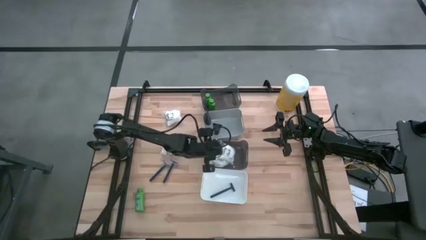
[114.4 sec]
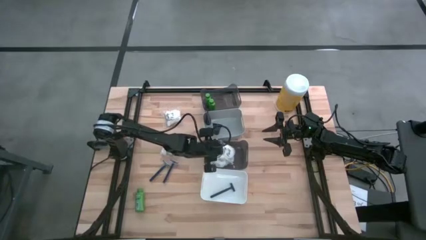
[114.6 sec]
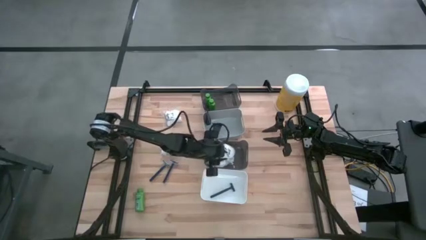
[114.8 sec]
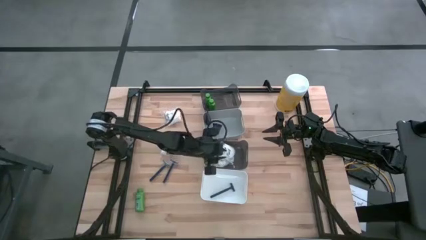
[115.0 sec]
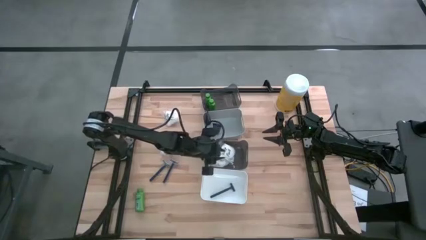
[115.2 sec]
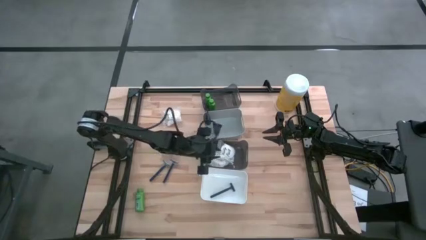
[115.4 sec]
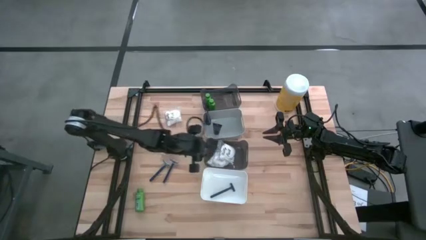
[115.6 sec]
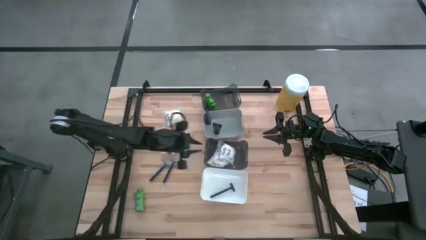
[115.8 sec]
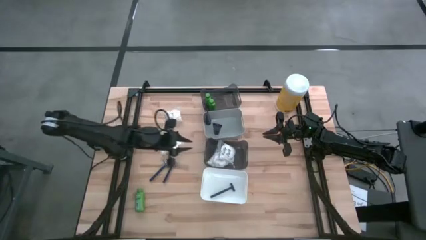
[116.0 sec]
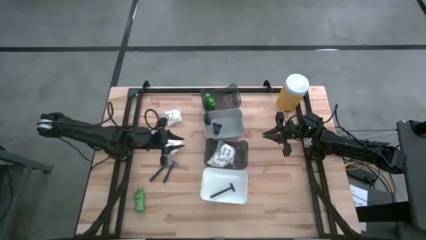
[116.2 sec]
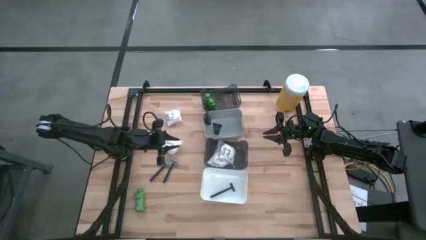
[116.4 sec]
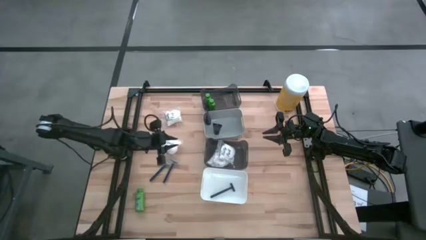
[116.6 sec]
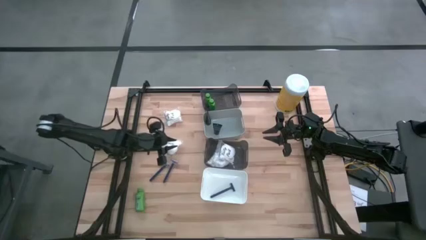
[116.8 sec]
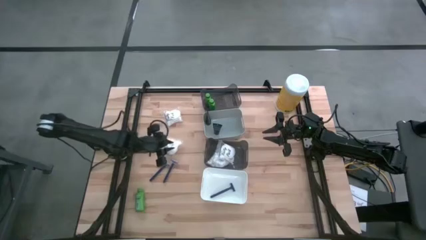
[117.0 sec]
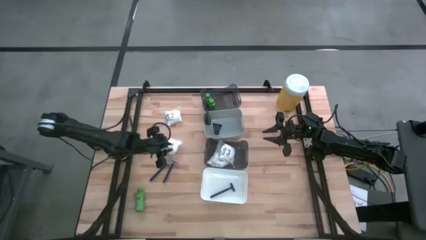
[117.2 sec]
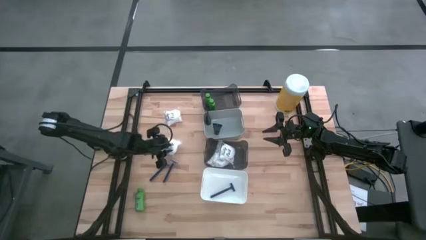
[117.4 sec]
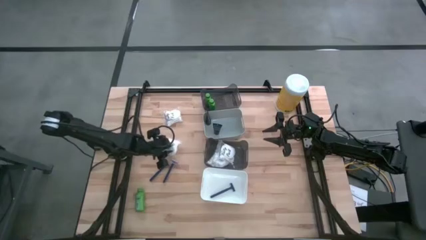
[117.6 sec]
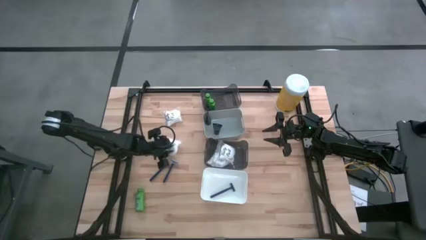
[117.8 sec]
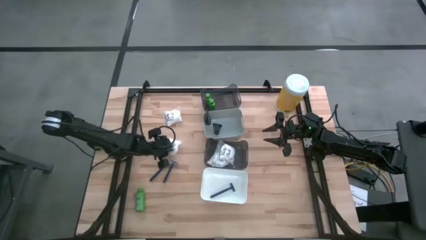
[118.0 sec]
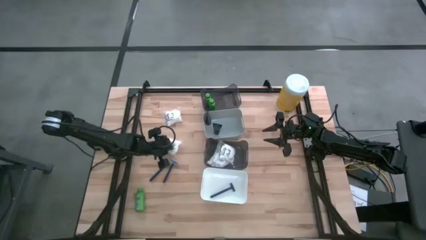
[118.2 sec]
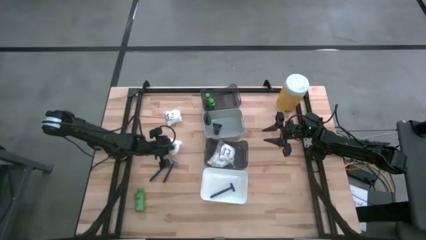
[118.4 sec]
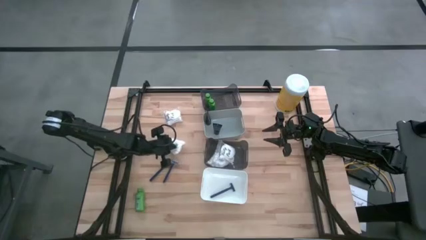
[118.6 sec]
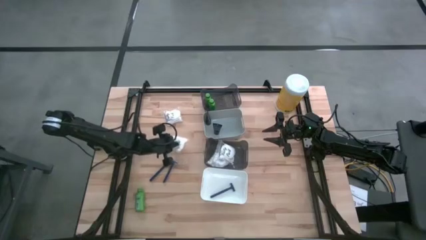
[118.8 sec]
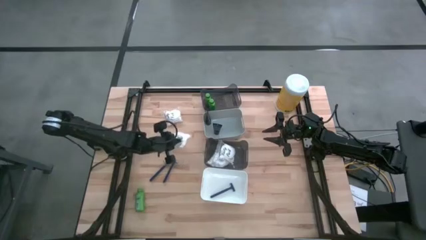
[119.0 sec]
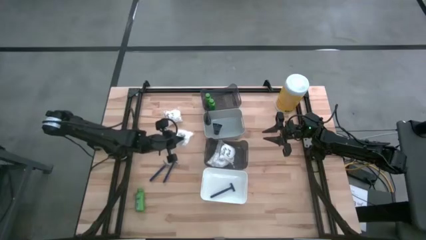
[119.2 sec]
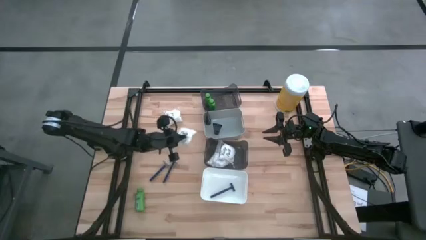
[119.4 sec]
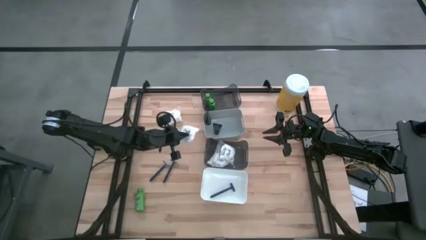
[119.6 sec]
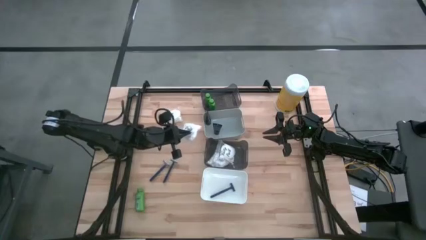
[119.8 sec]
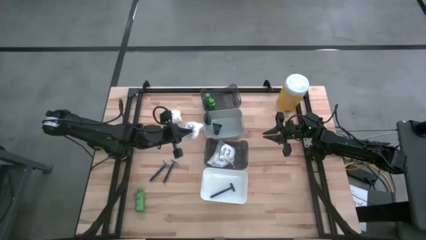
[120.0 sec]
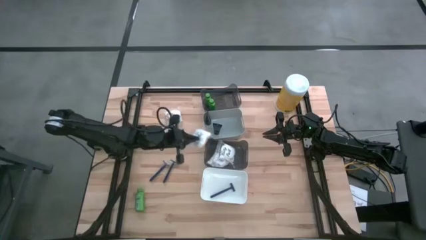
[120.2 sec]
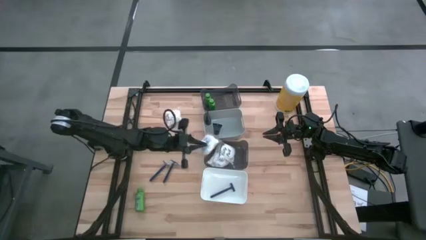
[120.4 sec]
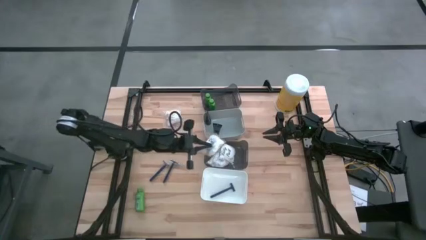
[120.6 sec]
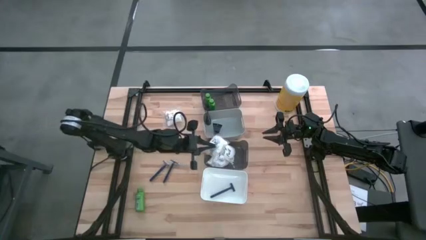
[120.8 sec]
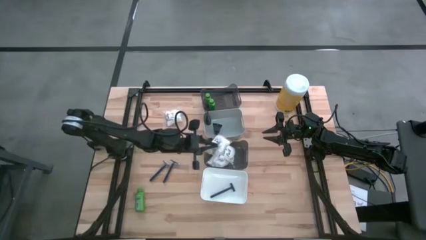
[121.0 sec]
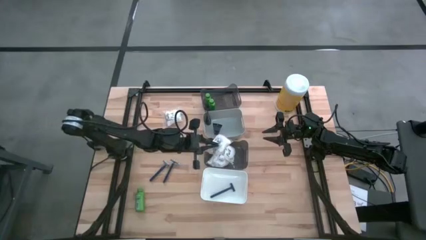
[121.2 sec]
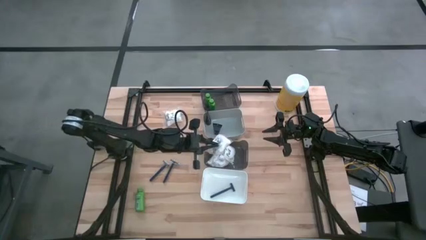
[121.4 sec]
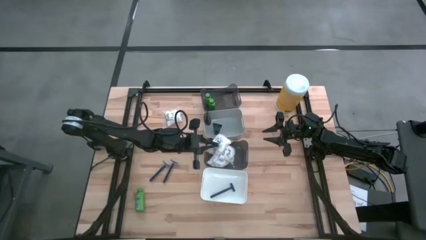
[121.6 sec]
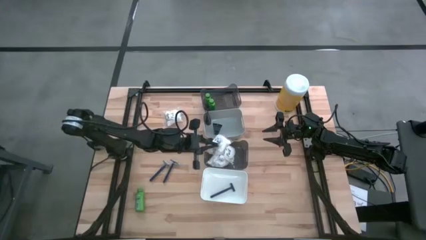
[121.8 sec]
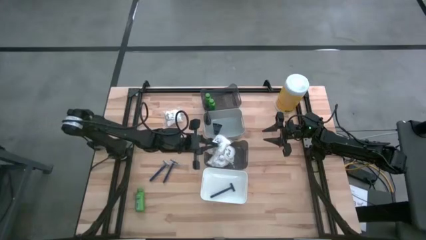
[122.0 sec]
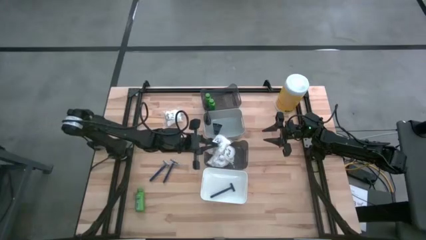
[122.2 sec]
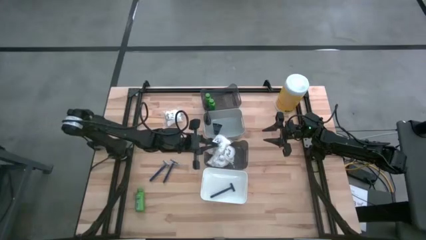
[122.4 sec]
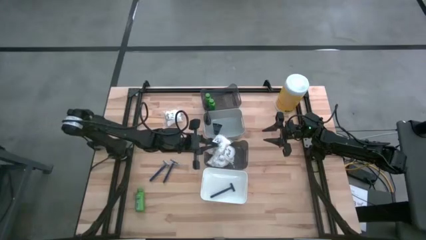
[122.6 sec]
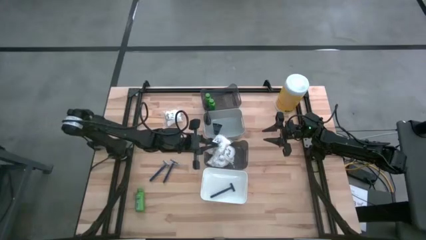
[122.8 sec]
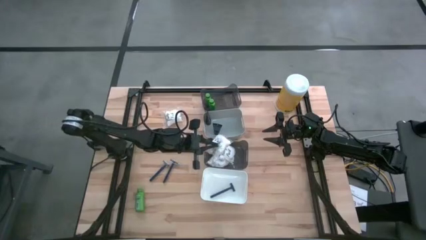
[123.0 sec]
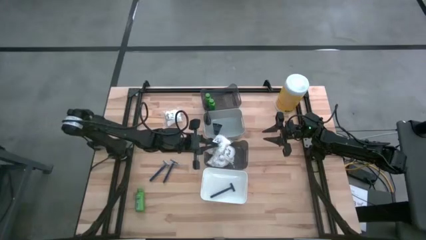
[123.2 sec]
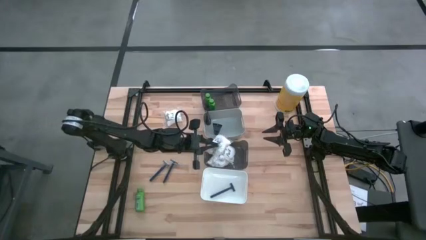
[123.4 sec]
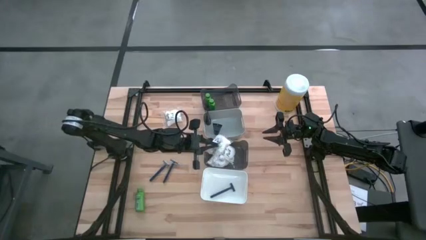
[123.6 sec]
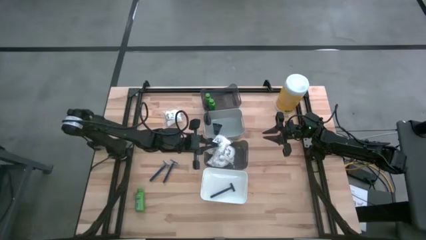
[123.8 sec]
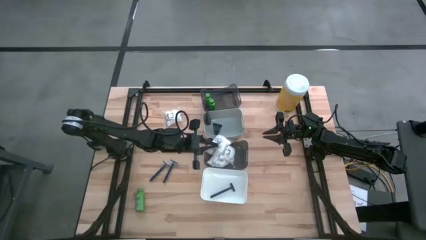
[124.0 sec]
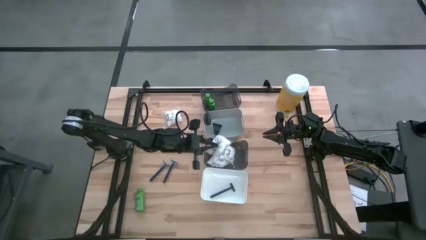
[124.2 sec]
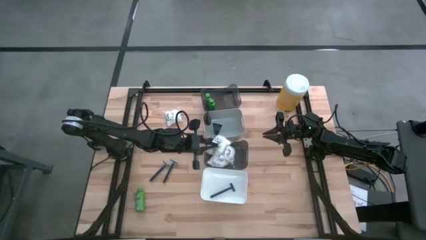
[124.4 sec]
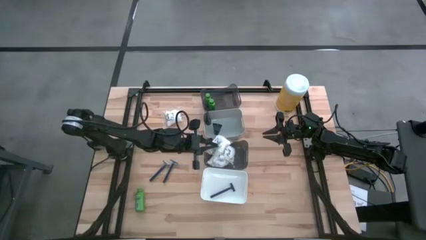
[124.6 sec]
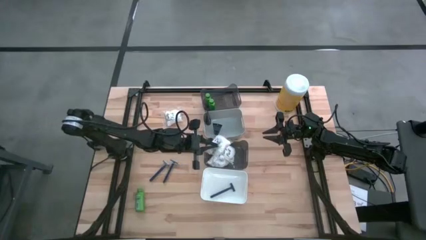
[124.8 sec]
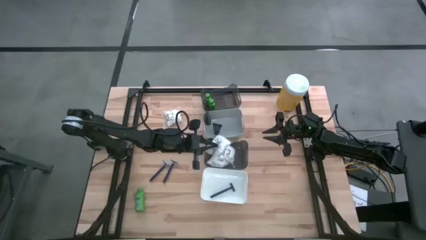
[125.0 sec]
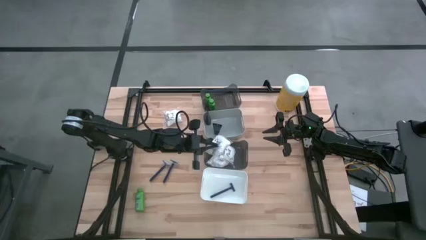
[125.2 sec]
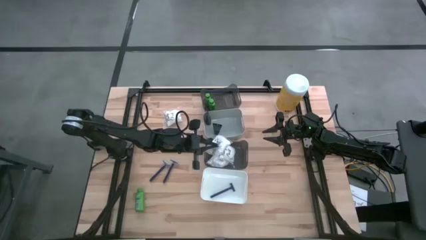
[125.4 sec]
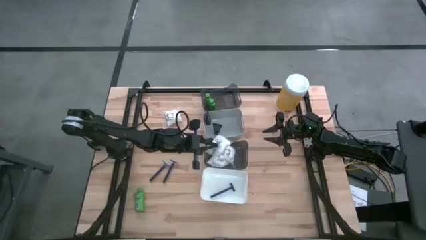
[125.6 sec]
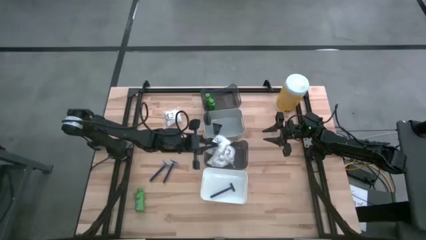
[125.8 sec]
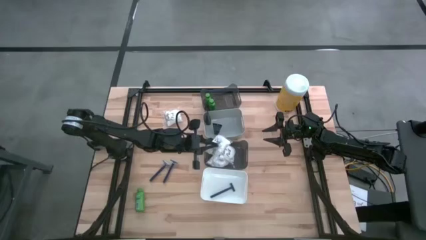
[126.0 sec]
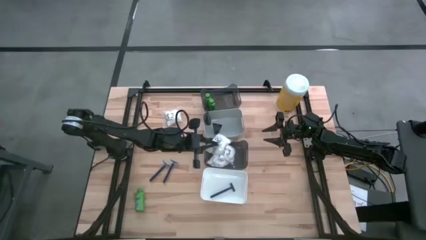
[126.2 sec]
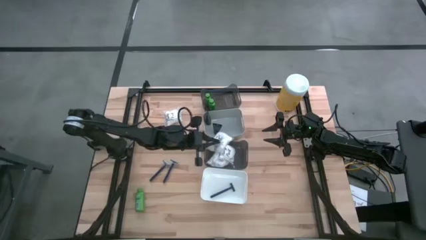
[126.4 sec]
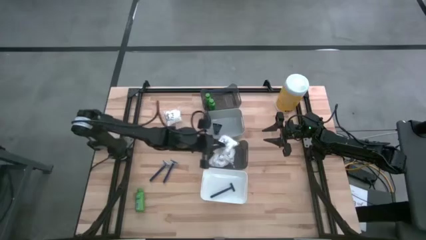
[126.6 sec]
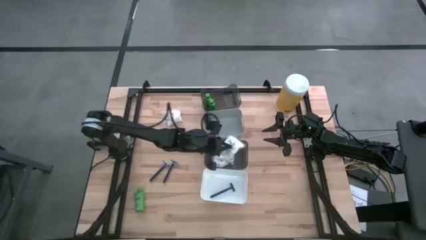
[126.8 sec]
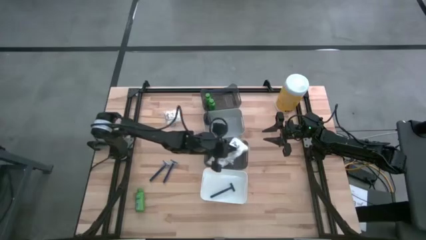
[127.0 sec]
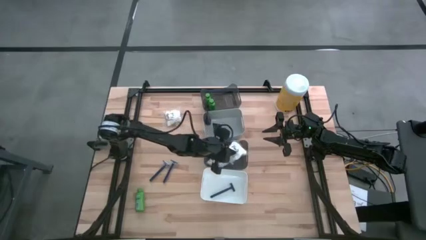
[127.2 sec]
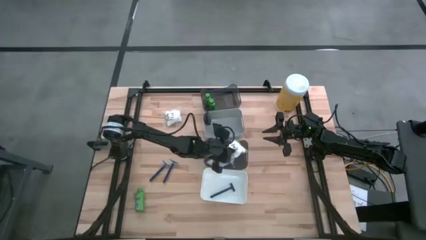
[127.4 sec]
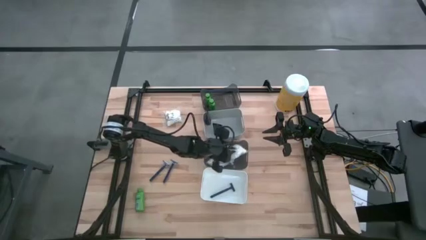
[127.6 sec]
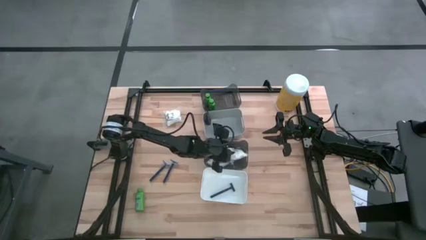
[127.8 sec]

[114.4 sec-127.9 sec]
Task: Pick & Place Travel size toiletries
Put the bottom white cotton pack into the bottom black bin

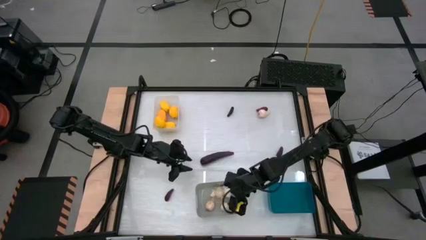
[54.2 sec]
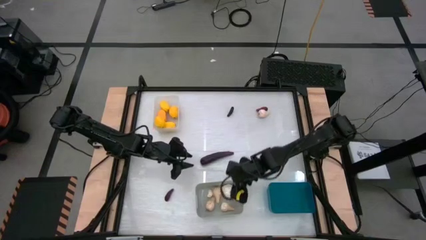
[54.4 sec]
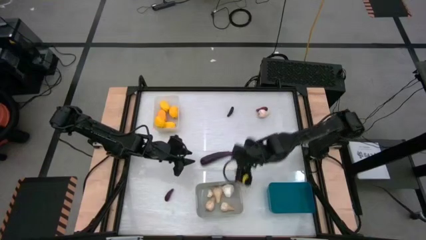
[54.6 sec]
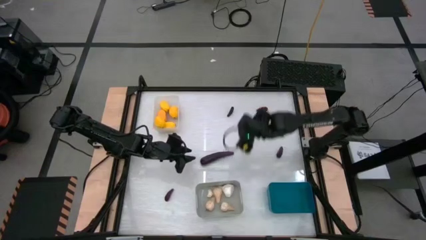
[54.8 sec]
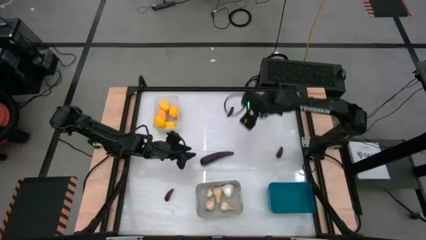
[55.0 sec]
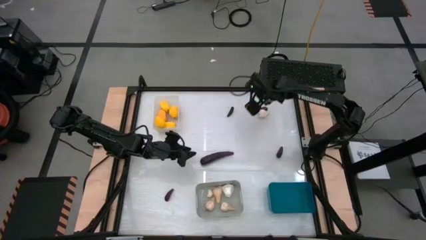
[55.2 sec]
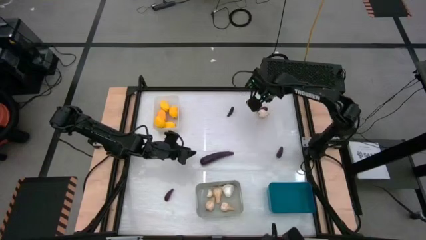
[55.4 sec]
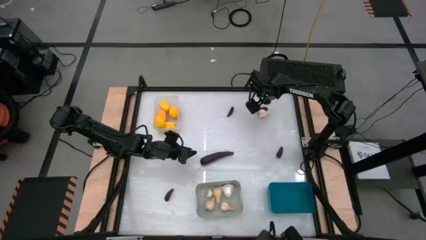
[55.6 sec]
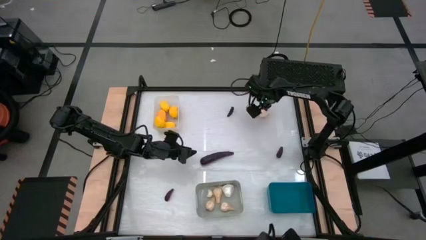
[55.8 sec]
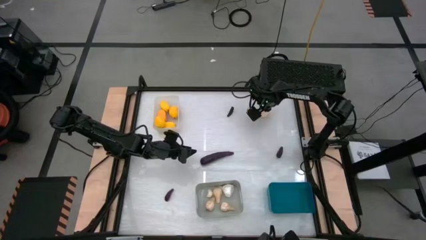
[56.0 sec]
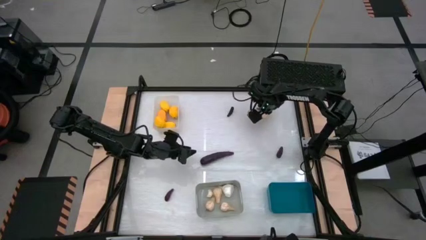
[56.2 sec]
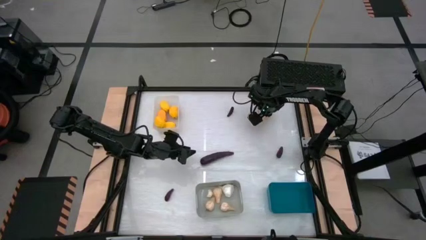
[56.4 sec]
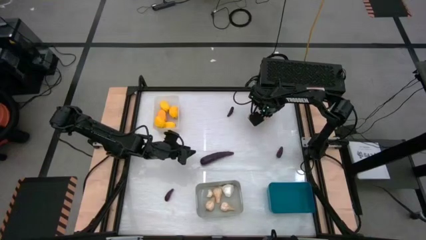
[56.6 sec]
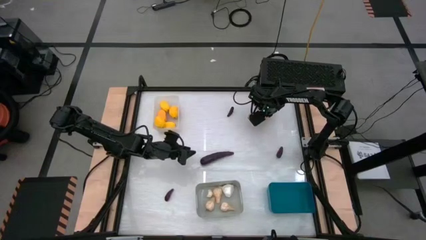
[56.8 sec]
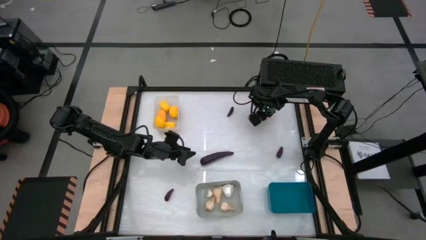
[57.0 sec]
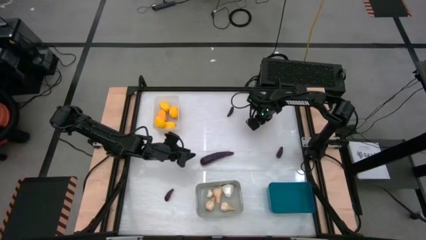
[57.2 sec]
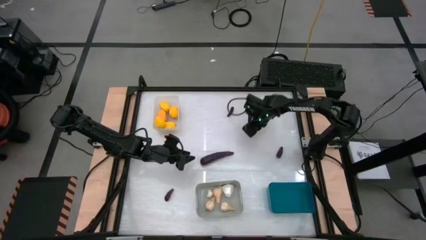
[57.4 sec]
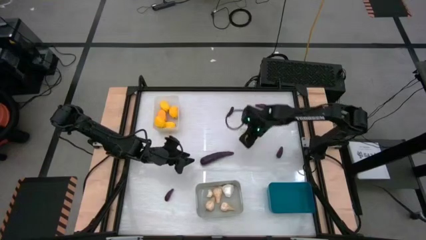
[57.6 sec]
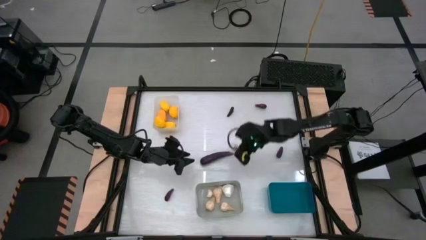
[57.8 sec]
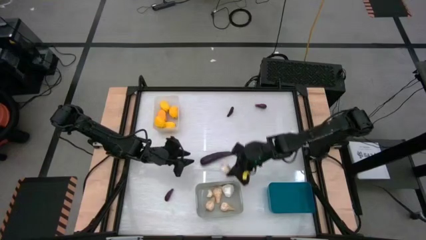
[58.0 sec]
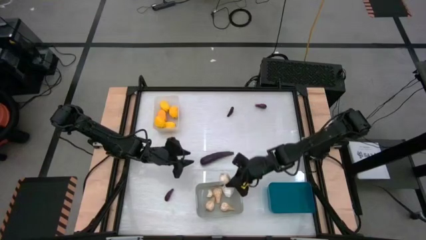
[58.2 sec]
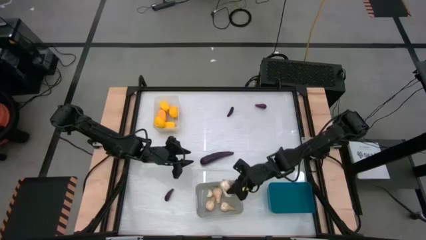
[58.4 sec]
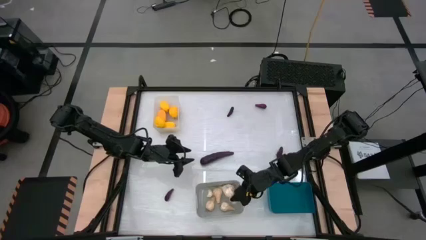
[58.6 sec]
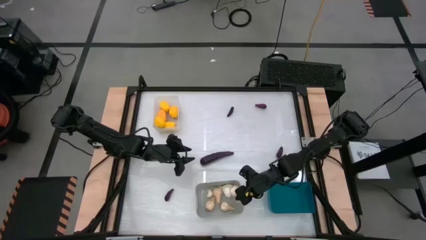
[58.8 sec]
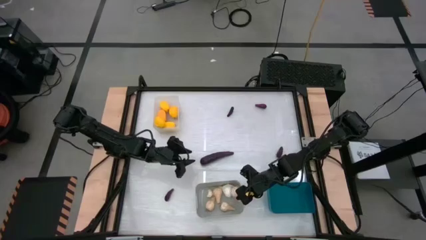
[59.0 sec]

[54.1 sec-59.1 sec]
Task: Sort produce into baskets
Put the garlic into the gray bin
